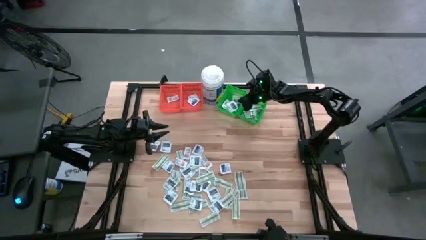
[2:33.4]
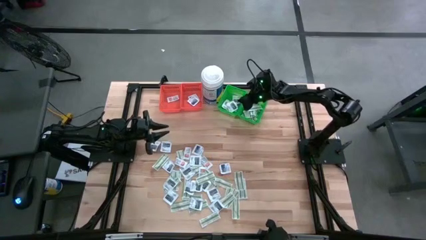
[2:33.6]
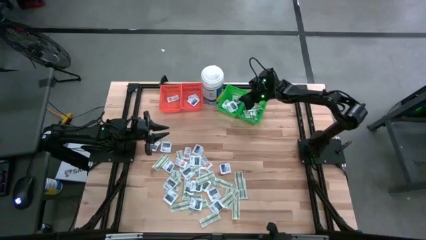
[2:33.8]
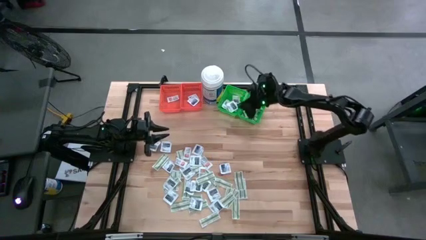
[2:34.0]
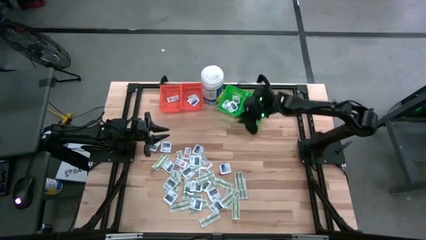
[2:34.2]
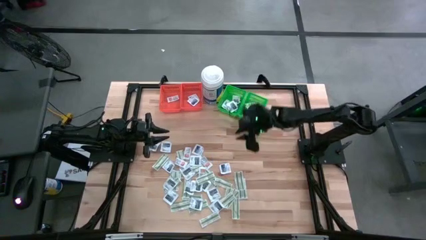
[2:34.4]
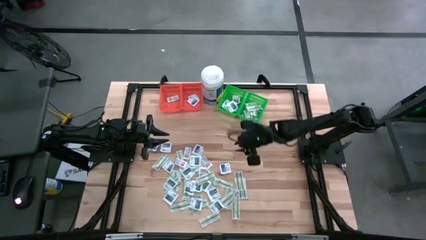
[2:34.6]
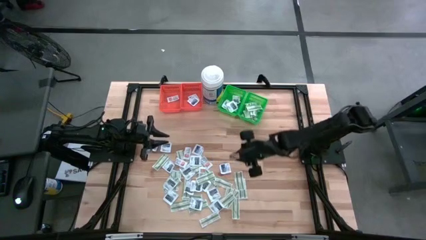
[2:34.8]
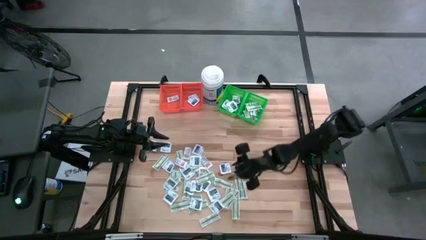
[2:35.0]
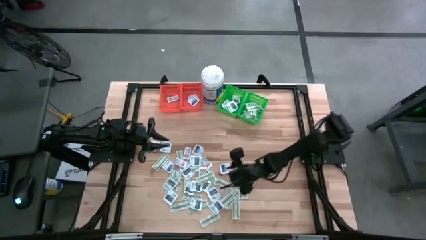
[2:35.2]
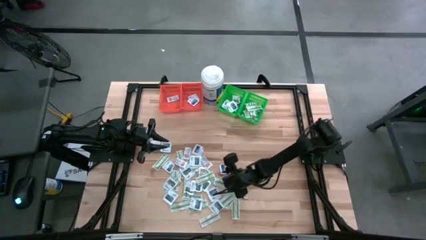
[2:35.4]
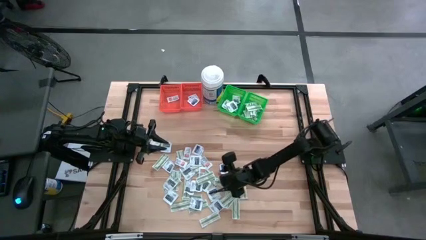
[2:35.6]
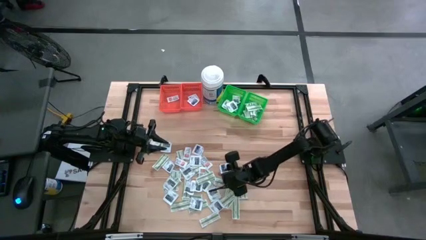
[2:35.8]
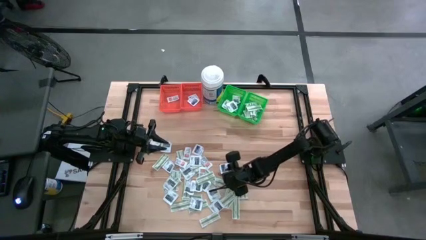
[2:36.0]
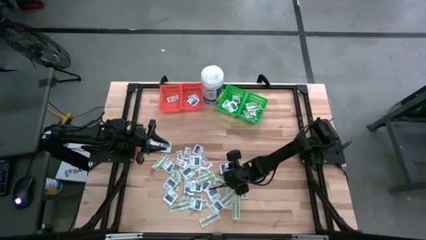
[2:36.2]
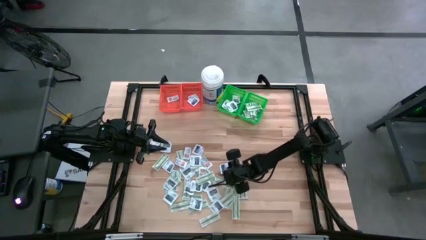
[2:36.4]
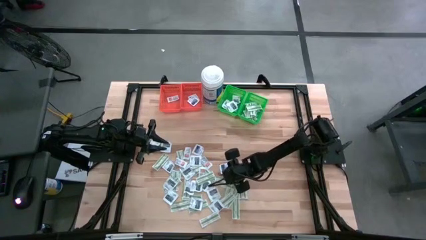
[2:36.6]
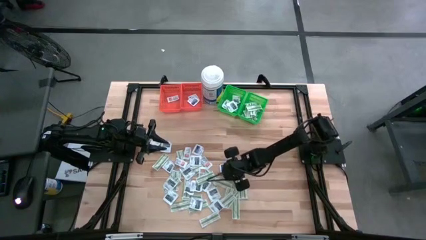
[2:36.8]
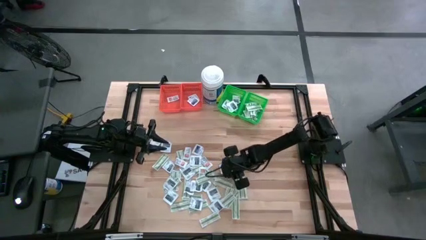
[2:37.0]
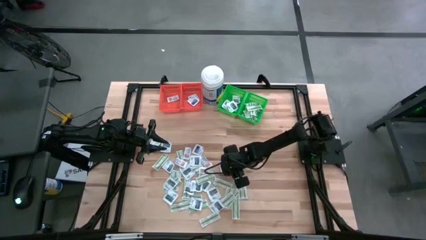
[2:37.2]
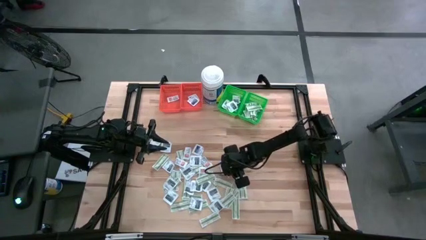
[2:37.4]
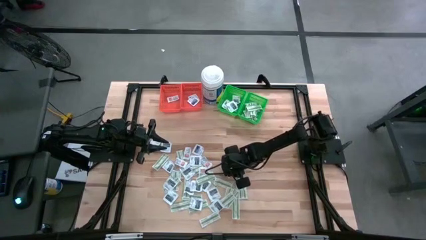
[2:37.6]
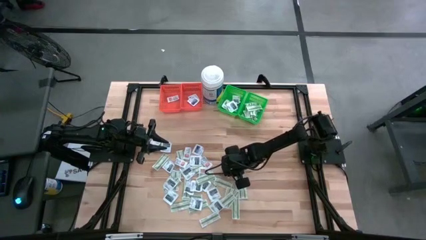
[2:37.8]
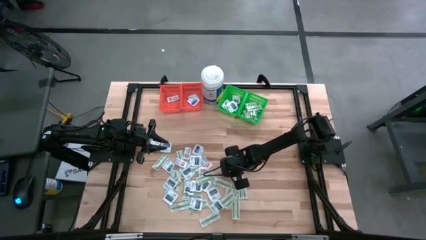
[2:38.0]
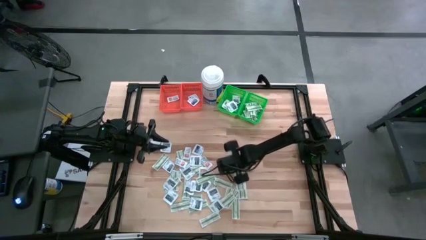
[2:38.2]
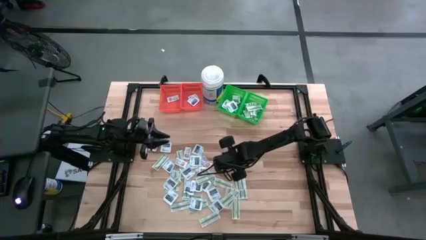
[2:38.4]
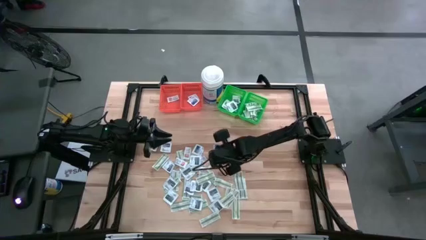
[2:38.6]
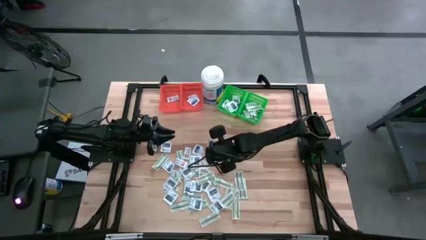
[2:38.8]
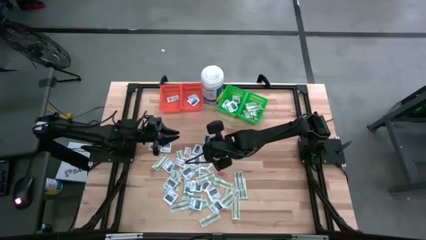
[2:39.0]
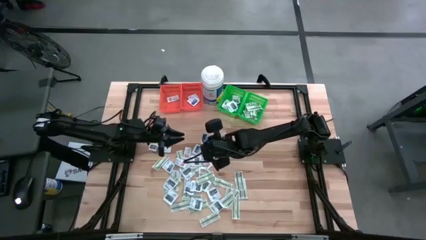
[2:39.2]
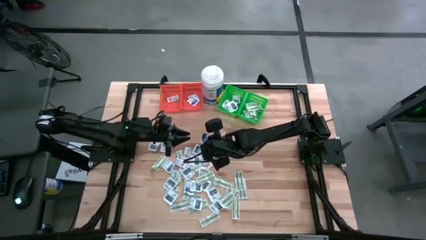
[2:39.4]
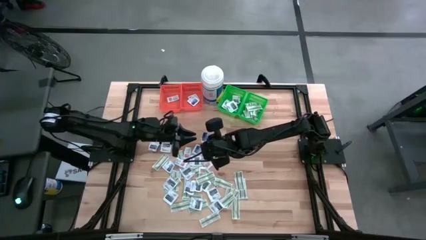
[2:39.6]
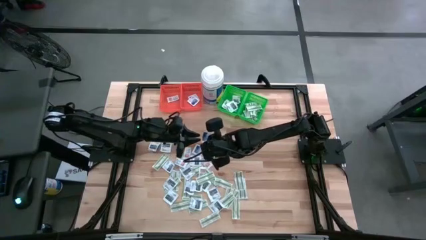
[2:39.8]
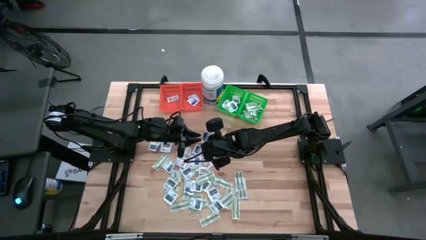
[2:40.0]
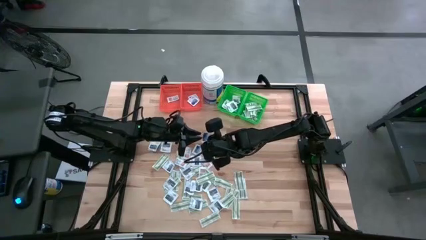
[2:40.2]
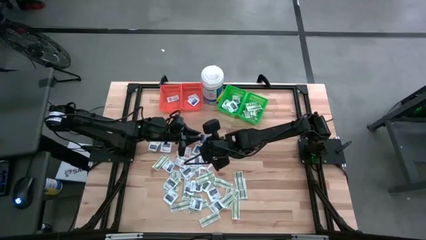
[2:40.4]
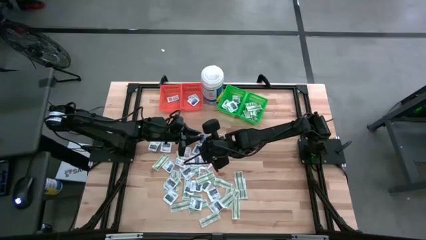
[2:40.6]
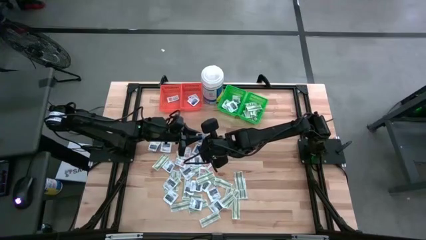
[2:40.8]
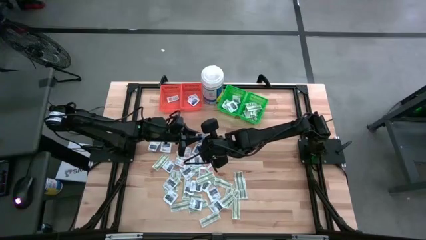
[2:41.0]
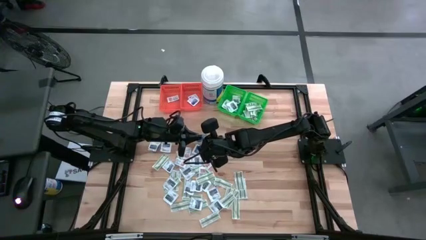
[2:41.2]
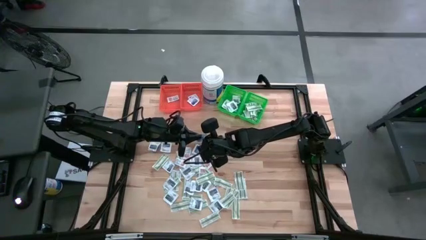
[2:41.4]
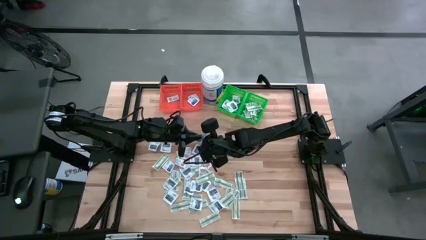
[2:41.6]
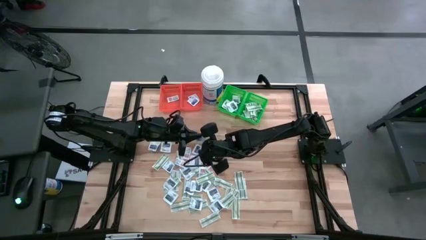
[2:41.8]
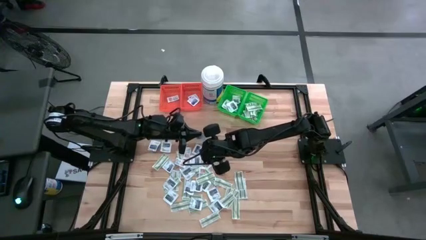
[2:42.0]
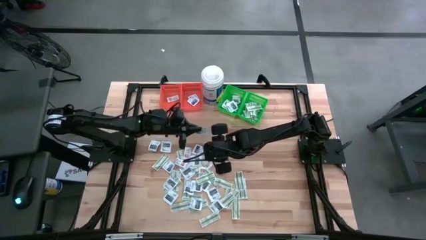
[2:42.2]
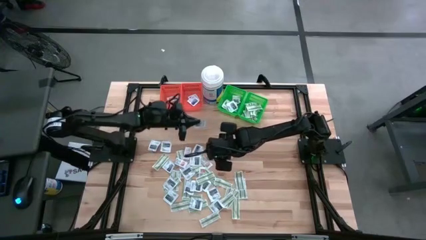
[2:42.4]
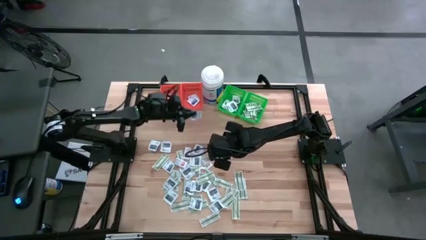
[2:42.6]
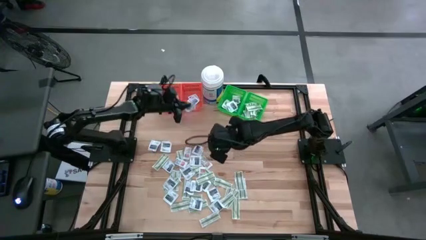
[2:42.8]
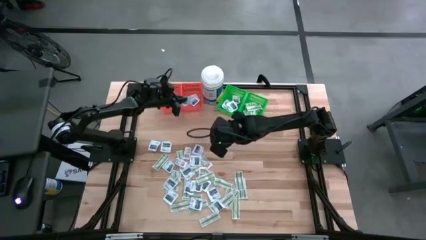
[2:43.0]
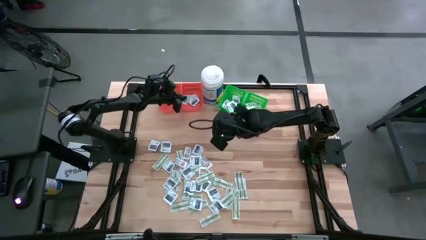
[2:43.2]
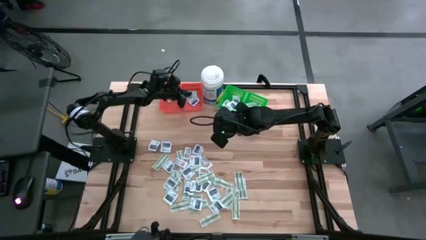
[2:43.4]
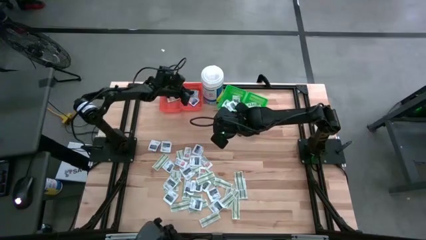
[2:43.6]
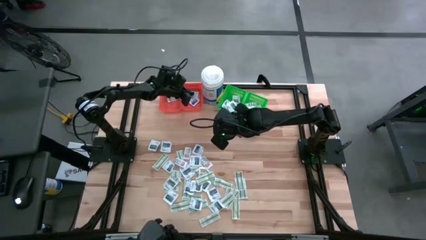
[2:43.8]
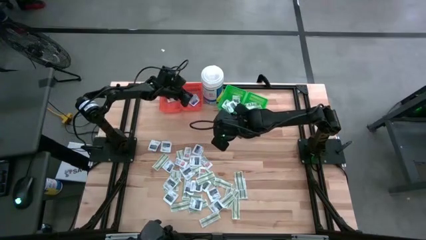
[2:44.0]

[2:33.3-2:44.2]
Task: Pick & Place First Aid Supplies
Put the blue alcohol pad into the right orange bin

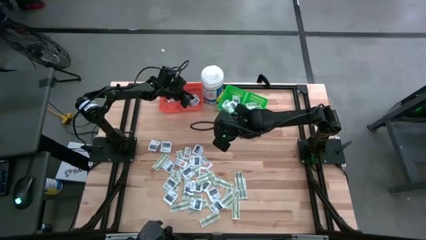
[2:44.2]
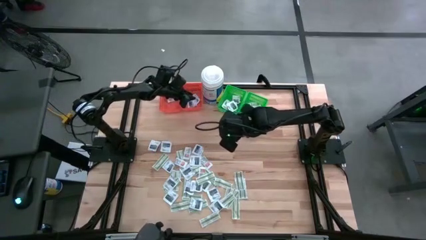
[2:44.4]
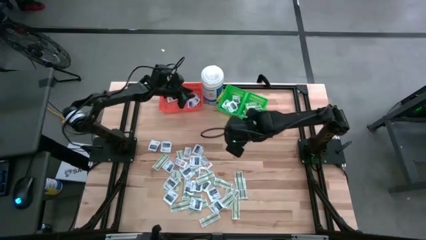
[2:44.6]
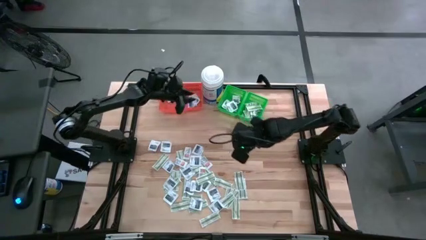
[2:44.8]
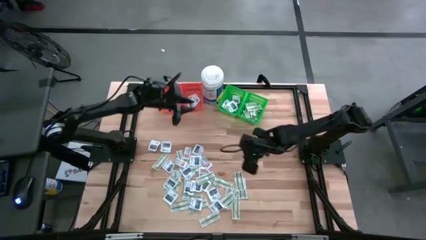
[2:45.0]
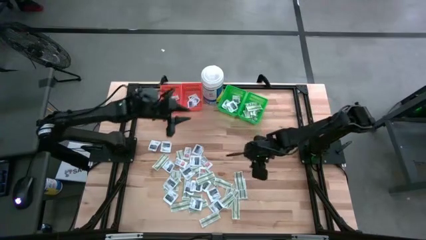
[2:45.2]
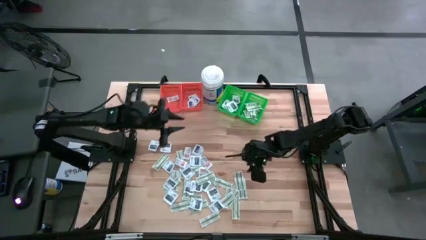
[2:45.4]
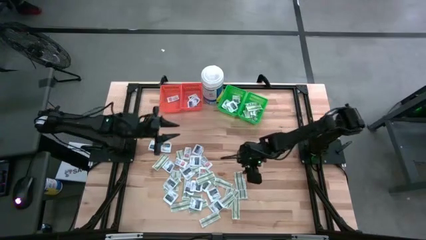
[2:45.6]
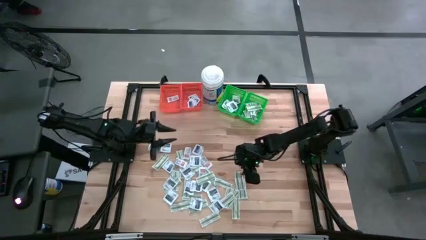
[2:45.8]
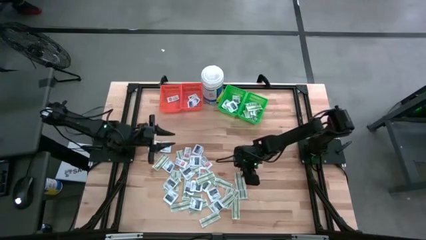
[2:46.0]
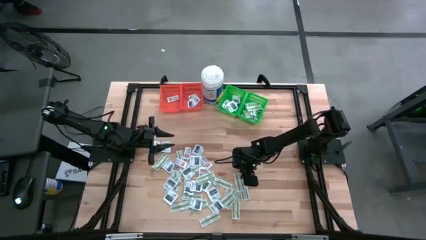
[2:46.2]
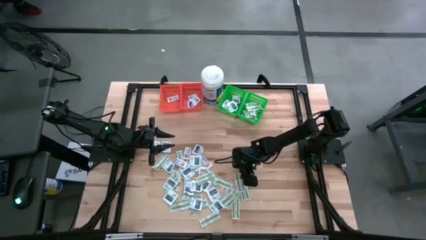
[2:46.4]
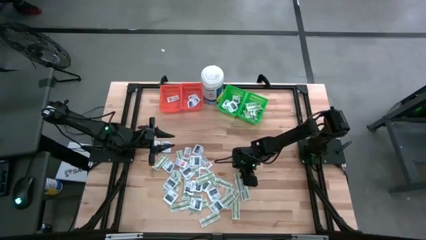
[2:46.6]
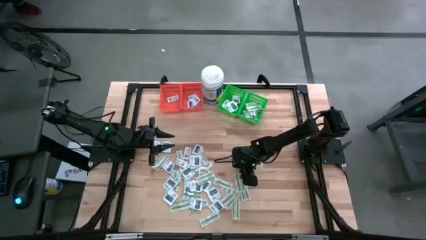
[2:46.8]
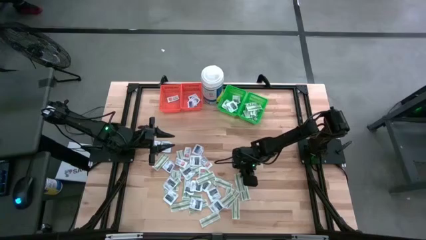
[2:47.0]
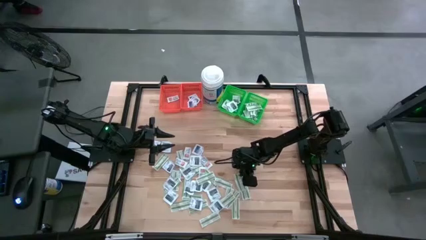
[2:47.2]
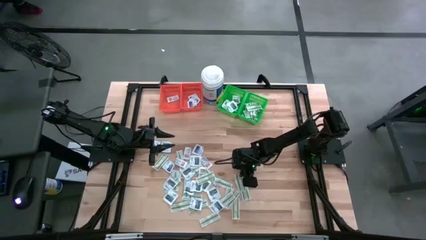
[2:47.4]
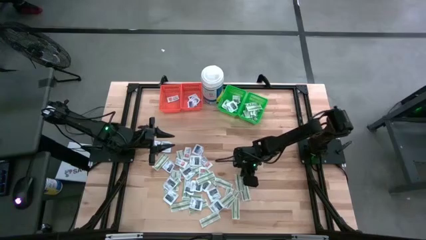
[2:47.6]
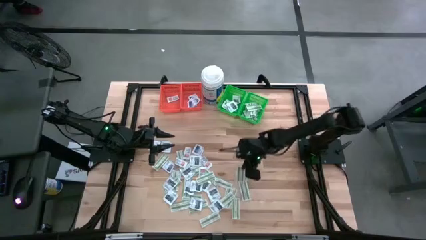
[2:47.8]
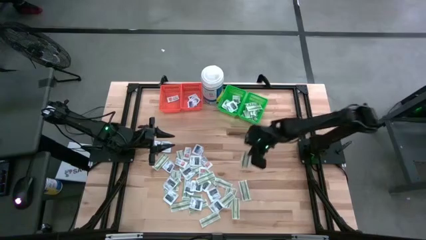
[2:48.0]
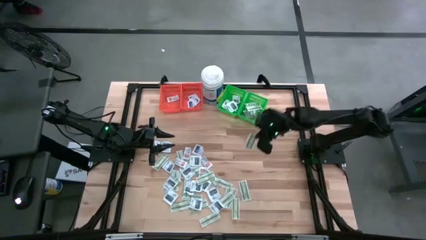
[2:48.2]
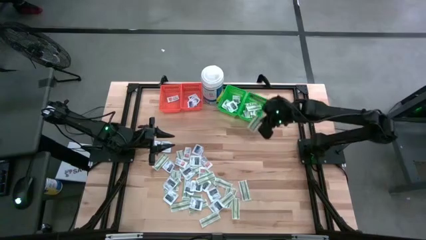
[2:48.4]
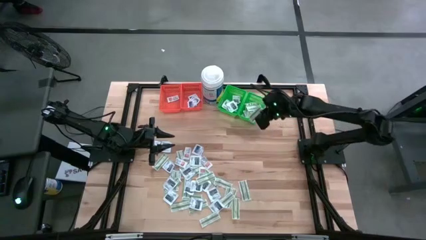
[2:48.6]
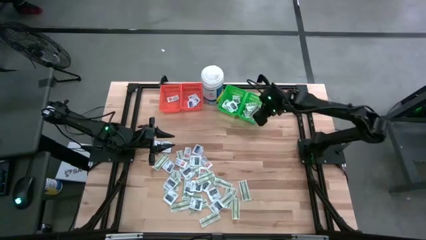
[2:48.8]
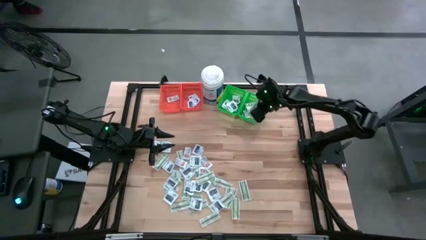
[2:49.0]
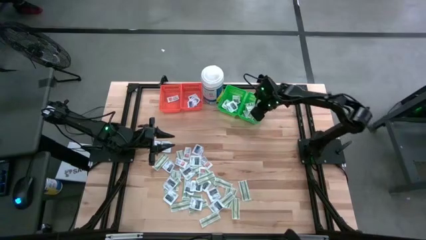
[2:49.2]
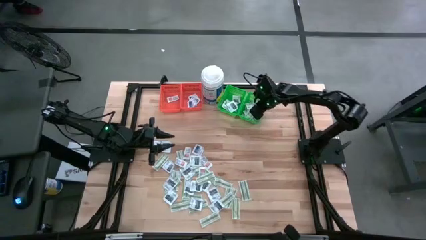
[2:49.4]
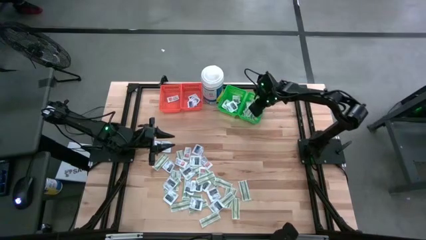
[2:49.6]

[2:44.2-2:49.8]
Put the green bandage pack into the right green bin
